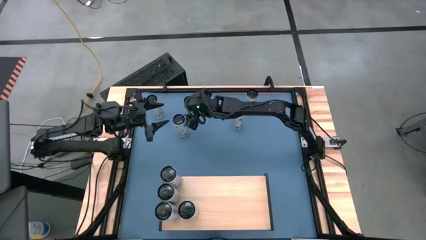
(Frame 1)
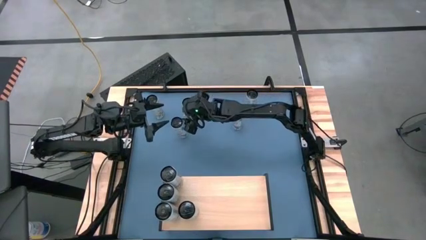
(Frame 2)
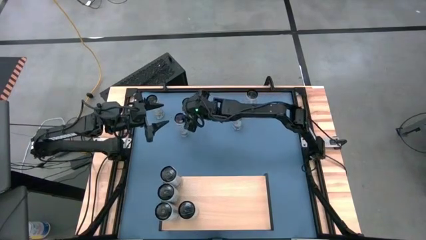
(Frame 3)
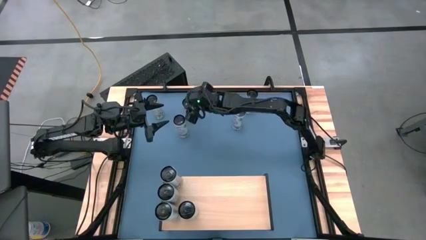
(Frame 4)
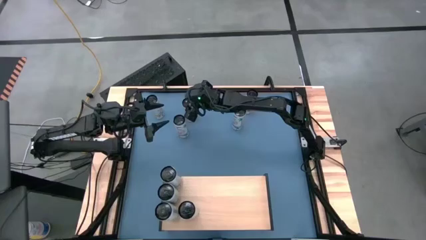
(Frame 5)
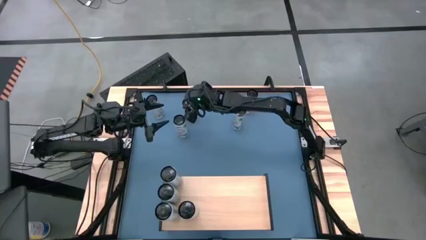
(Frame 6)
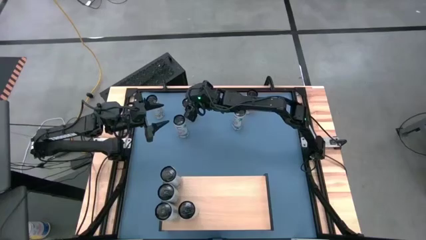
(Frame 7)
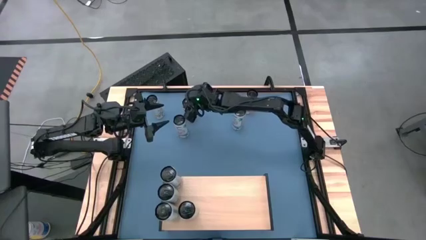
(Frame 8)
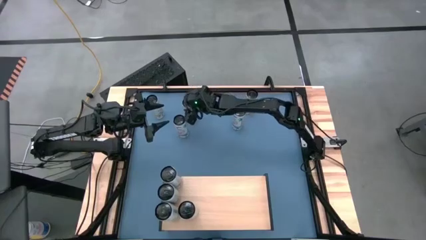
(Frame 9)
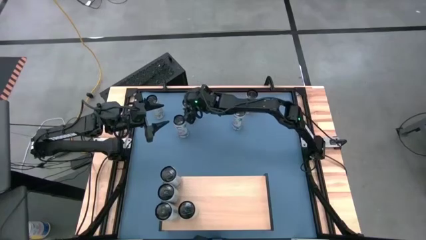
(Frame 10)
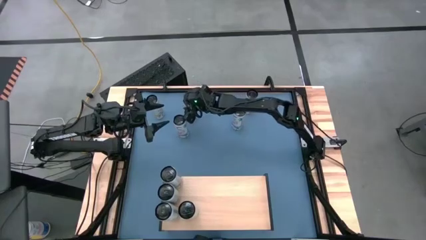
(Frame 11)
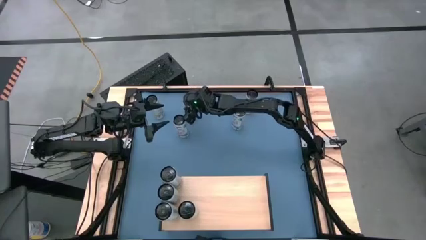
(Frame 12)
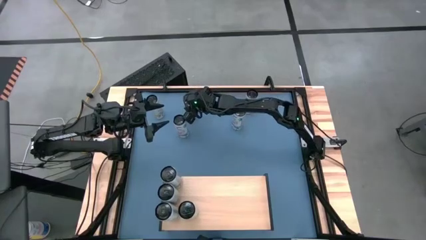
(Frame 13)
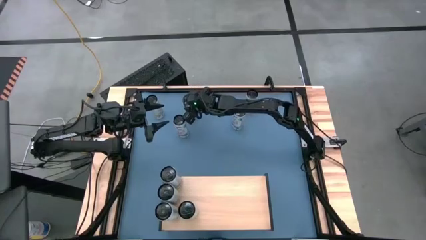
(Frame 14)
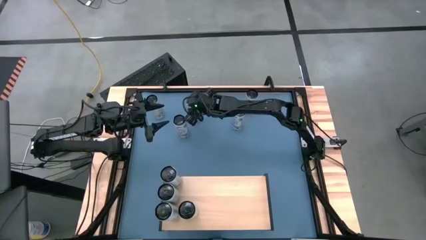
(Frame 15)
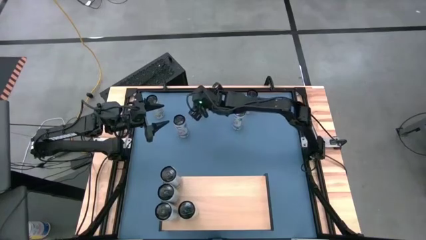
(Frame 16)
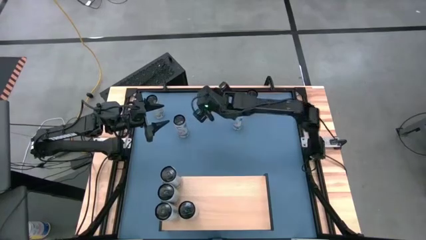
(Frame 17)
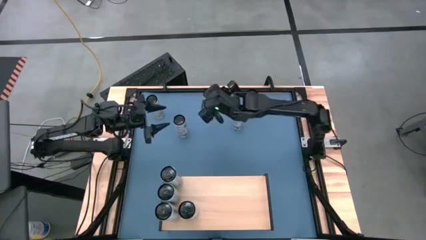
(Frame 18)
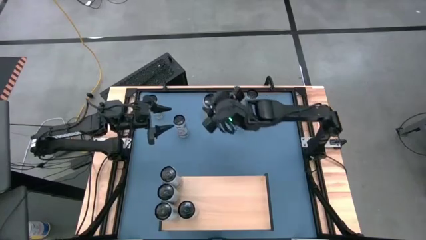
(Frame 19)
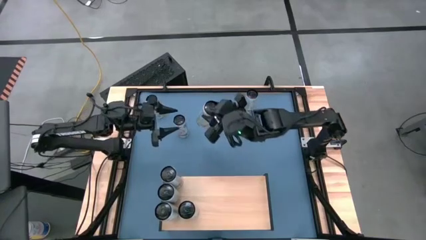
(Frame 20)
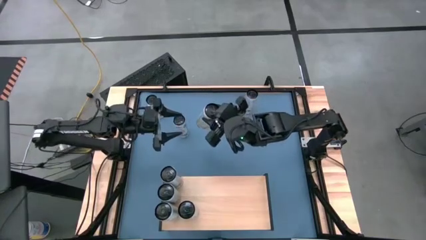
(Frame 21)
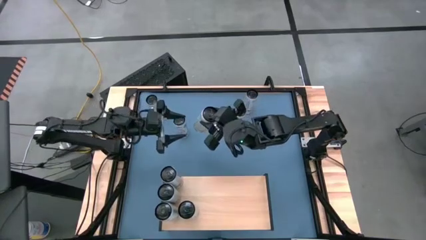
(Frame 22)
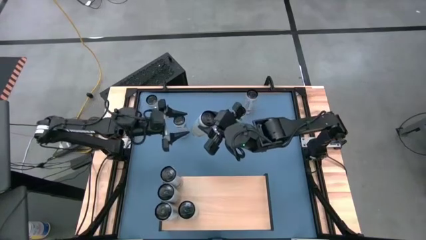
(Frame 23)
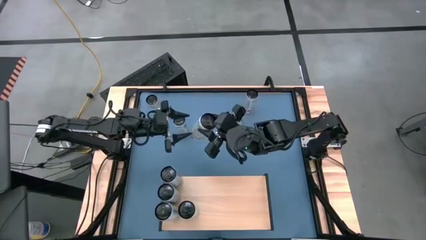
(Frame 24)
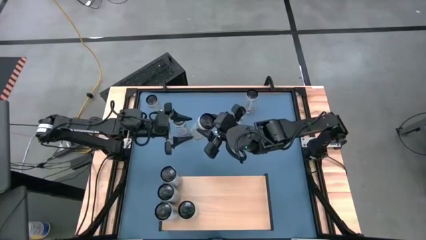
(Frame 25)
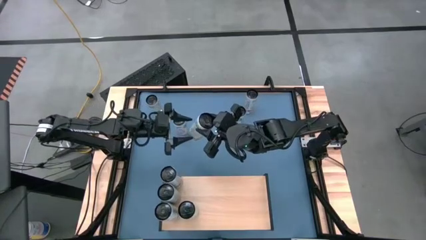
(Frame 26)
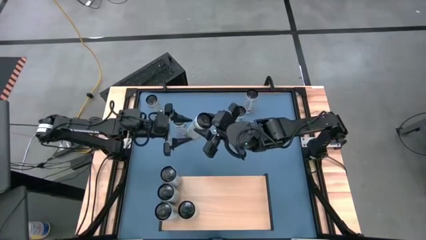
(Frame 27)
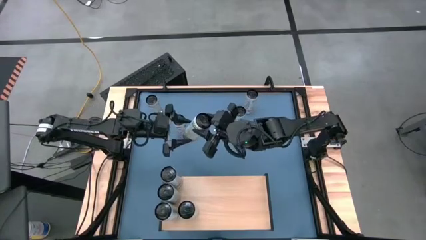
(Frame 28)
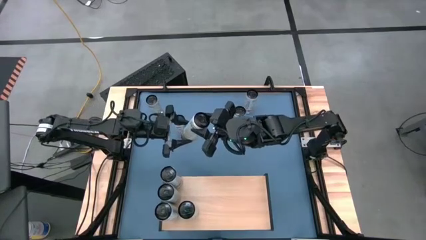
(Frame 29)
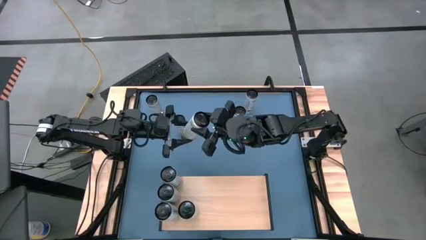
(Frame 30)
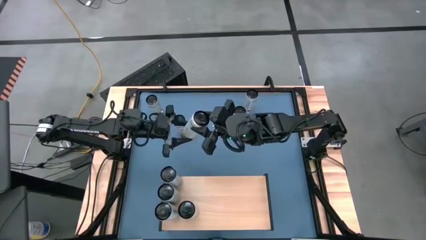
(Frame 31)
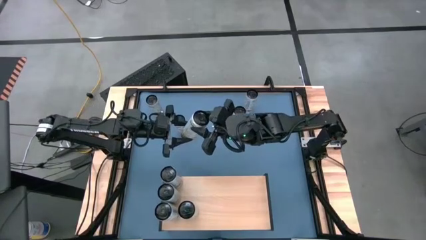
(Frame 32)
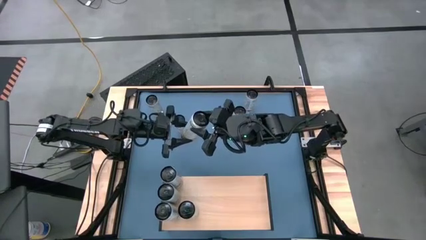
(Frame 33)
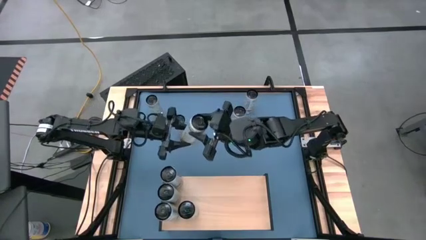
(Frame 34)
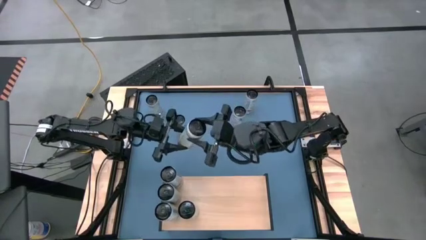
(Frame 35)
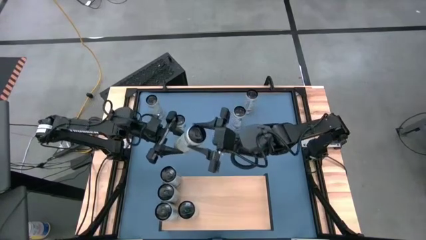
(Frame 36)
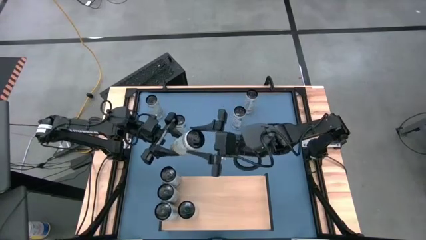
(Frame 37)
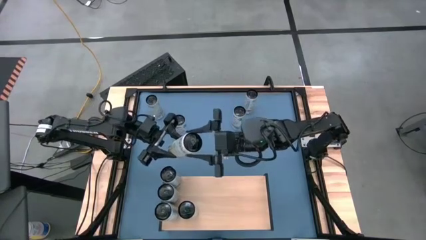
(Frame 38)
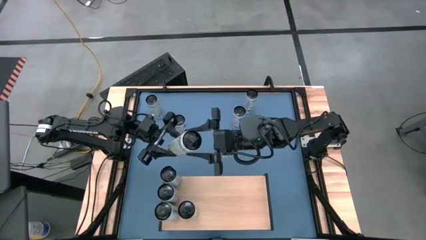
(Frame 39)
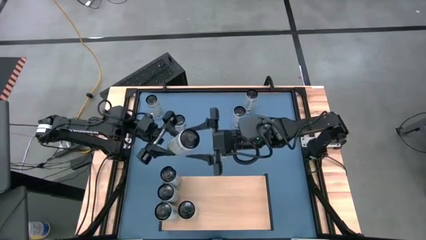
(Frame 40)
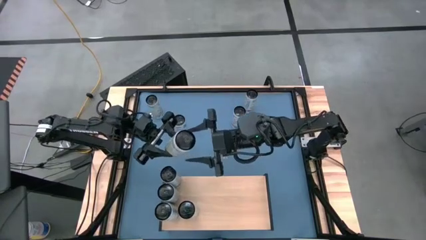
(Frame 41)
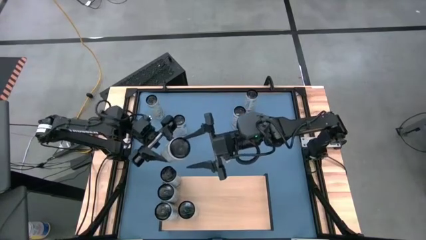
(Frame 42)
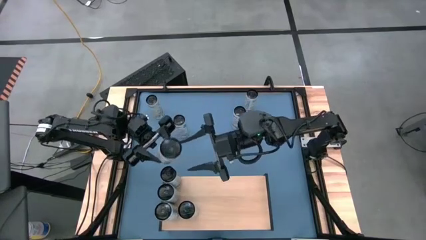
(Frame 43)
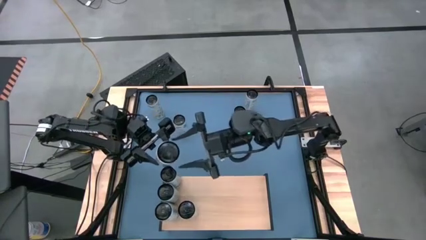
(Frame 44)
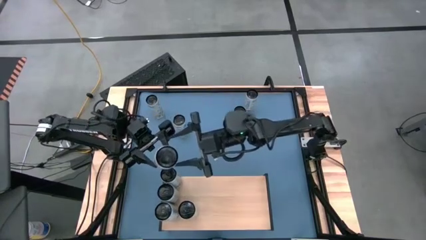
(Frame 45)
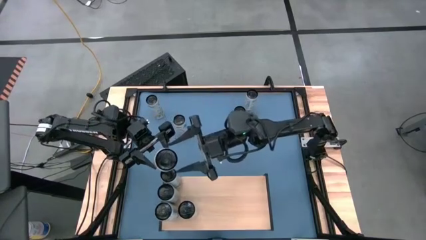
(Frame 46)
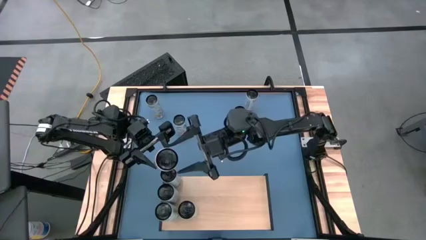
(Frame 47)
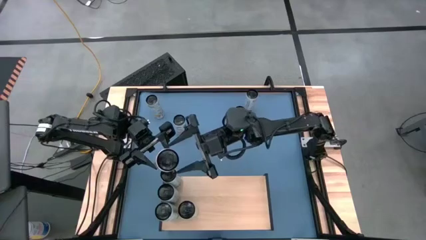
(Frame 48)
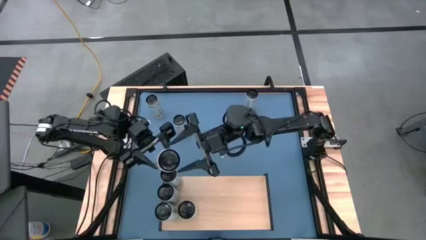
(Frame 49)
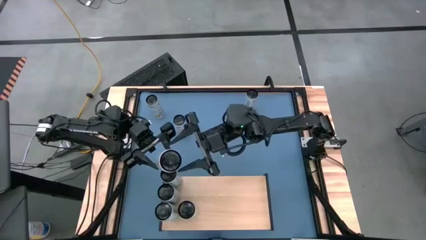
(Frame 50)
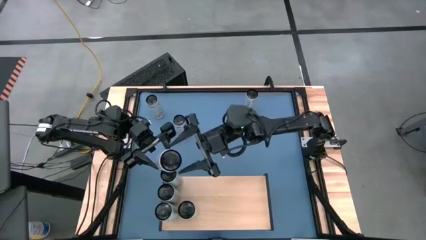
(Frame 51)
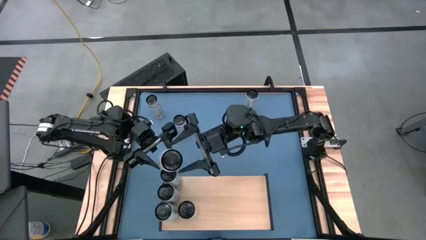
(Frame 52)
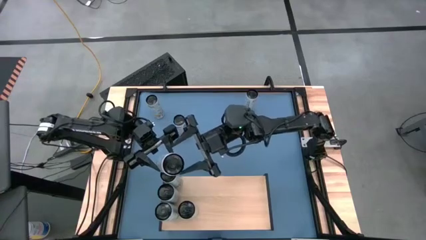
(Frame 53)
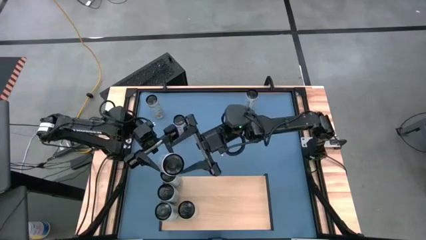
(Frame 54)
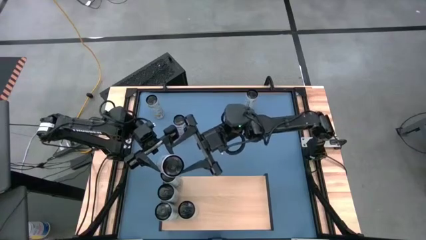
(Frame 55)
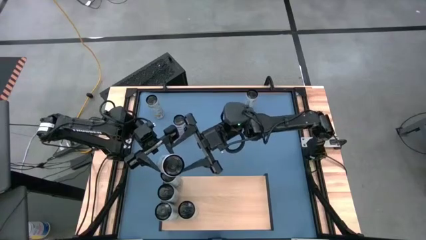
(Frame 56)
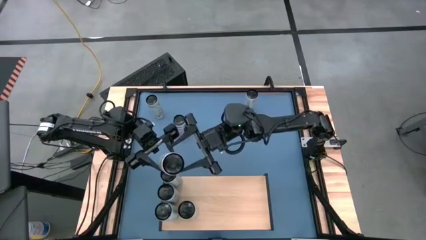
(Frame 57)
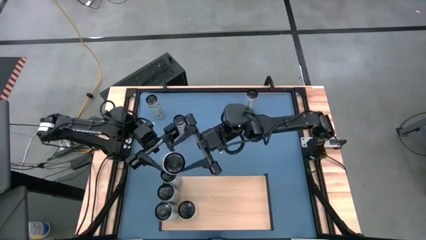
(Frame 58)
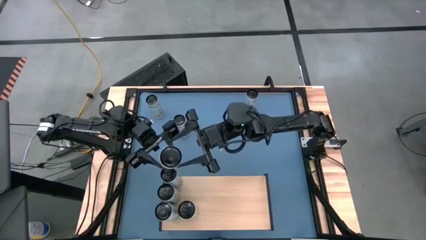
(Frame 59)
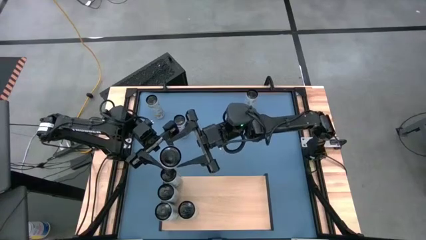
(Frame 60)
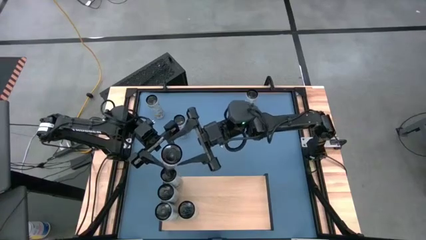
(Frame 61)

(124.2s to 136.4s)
Task: Place canned beverage on shelf
Put the right white yellow soda can on the shelf aligned with the other white yellow soda can

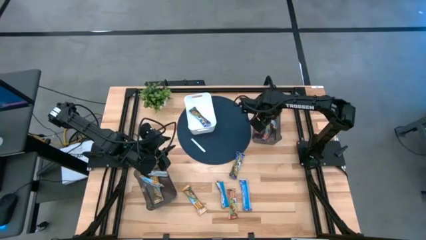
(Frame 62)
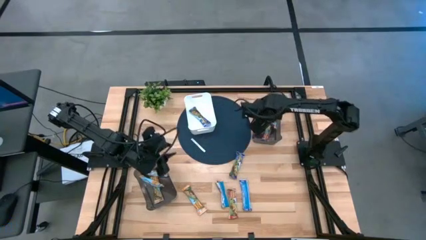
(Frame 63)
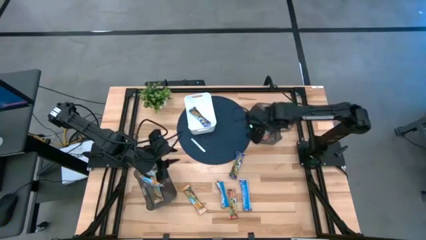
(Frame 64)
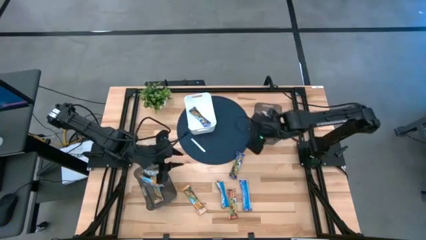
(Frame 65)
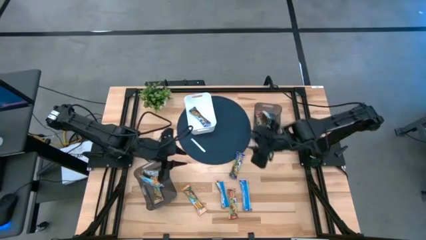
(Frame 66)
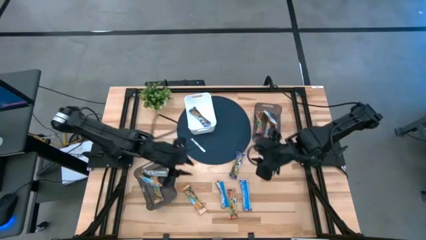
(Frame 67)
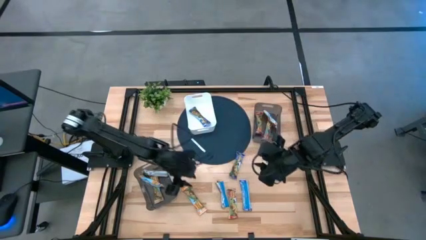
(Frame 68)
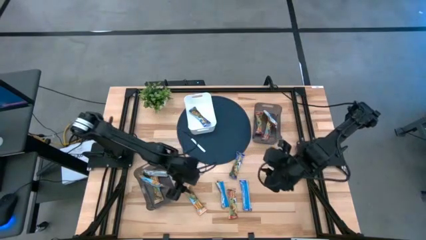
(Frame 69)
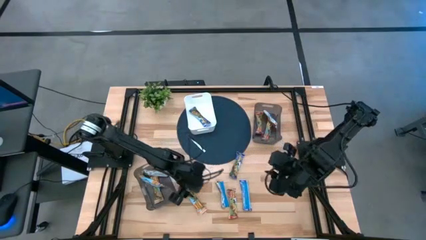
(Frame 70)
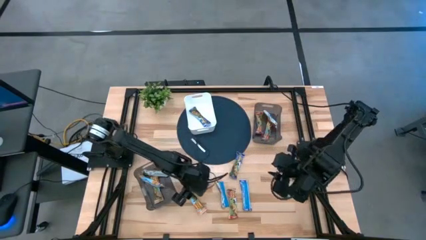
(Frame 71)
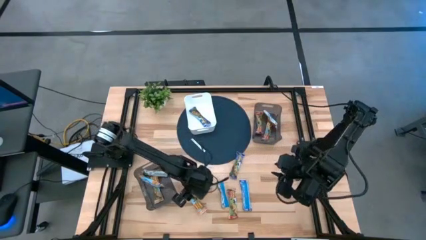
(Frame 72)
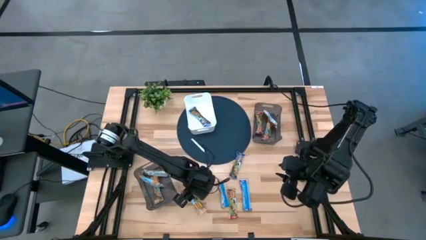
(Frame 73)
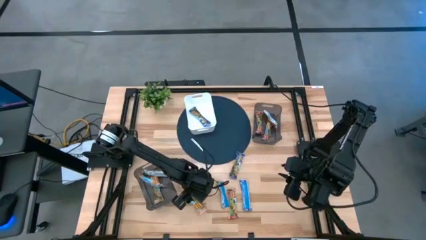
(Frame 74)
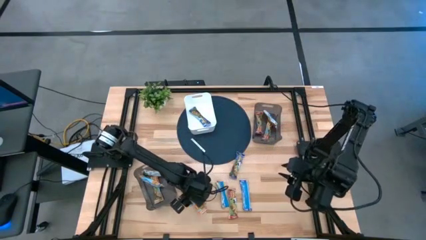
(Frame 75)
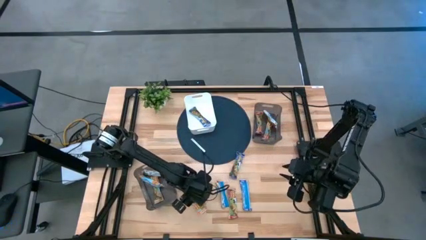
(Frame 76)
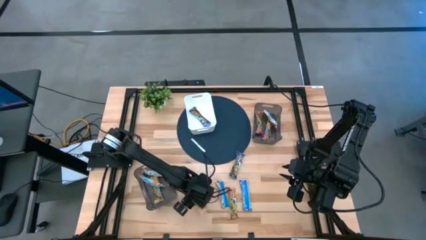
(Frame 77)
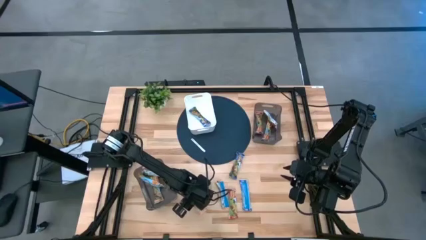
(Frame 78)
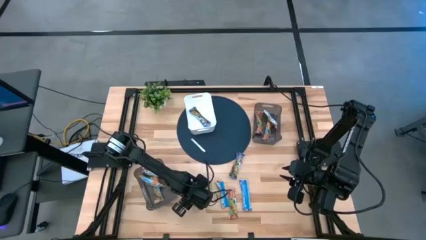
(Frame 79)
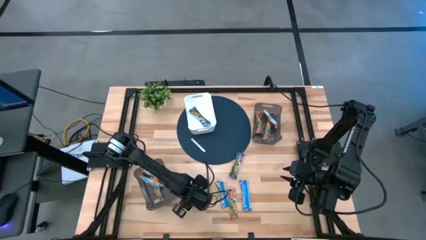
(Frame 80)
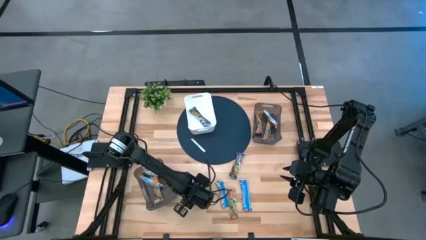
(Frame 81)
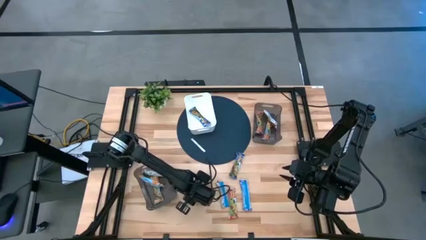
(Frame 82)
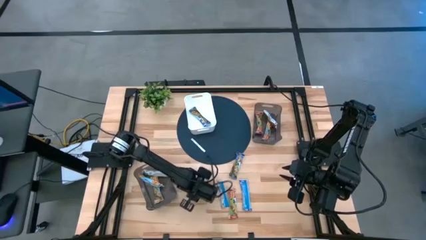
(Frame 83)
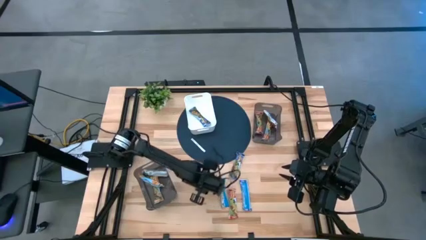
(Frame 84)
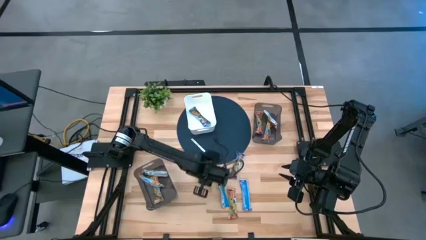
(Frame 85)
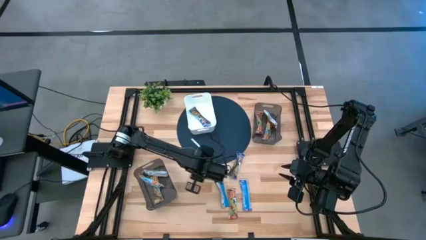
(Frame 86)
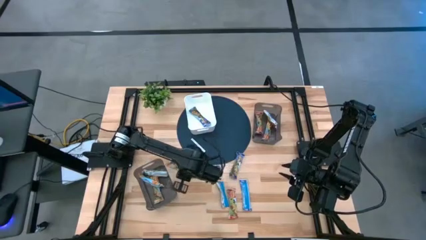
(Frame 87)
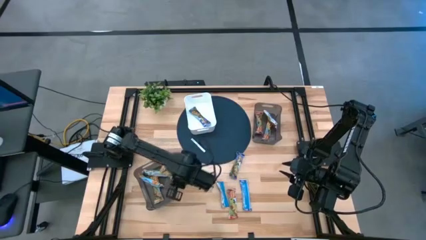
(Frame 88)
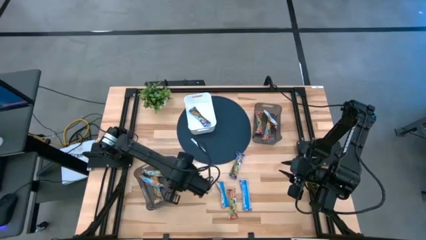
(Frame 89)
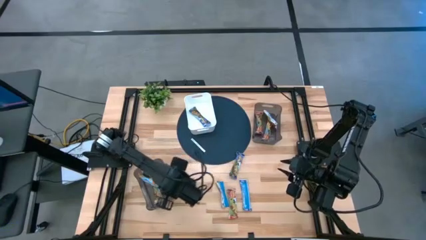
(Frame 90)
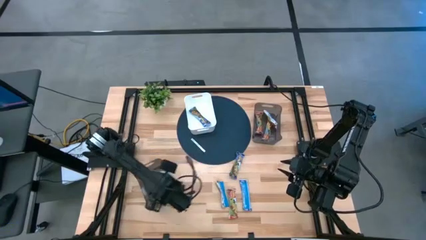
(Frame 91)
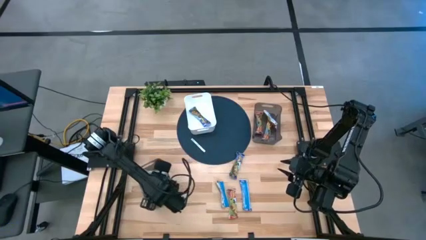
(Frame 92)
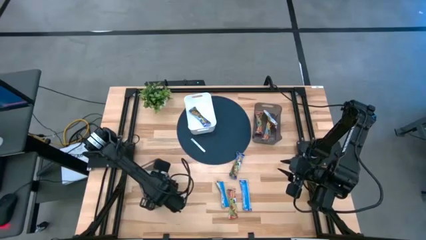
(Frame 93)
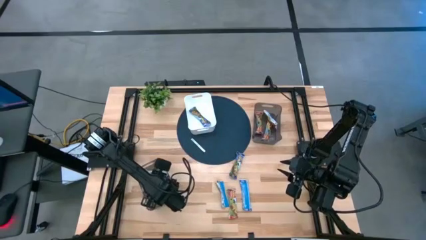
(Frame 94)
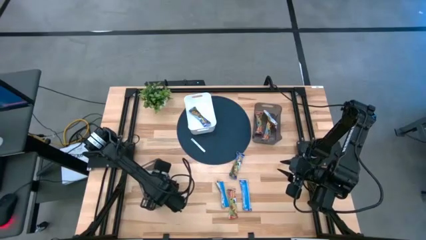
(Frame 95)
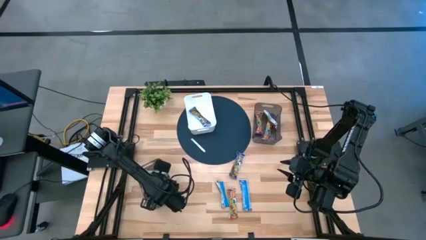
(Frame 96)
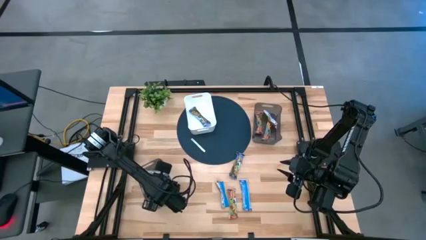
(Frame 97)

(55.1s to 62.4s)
Task: Pick and place Granola Bars by type
Put the left yellow granola bar into the bottom black bin
